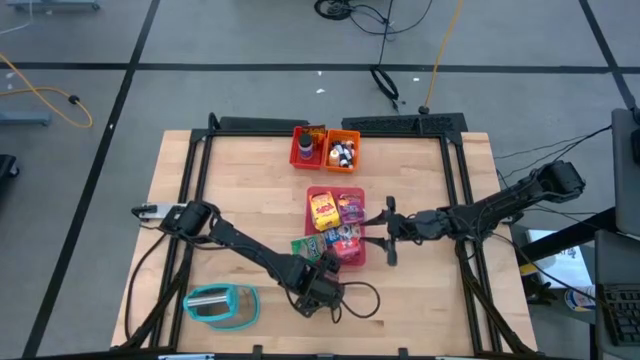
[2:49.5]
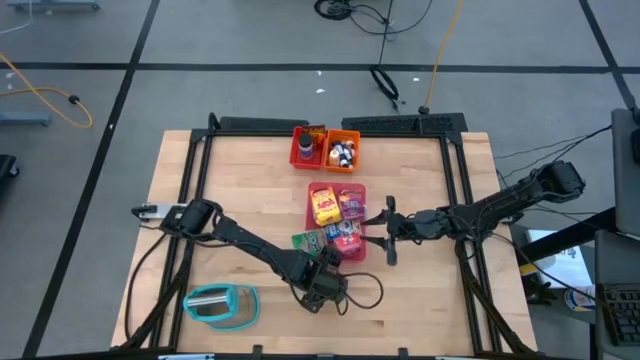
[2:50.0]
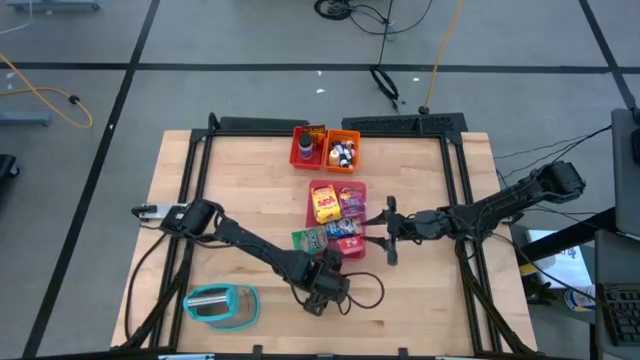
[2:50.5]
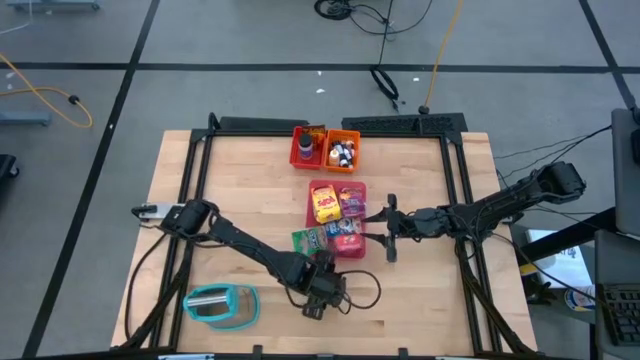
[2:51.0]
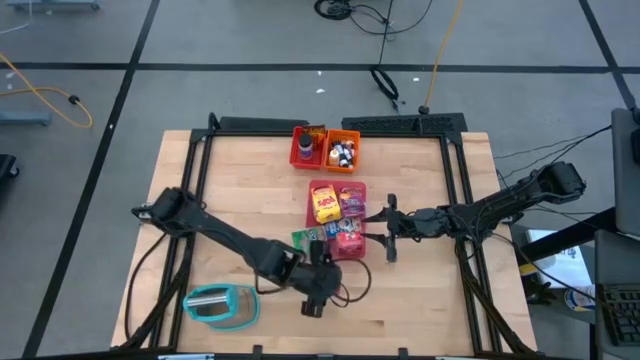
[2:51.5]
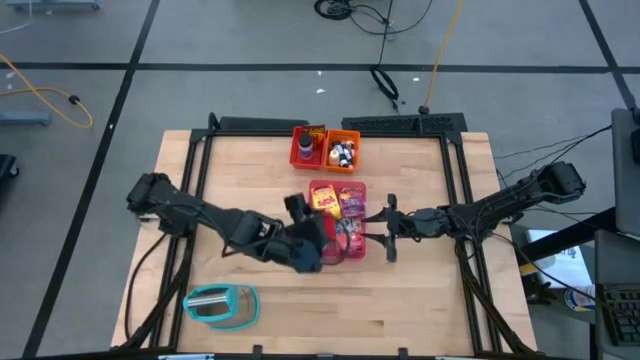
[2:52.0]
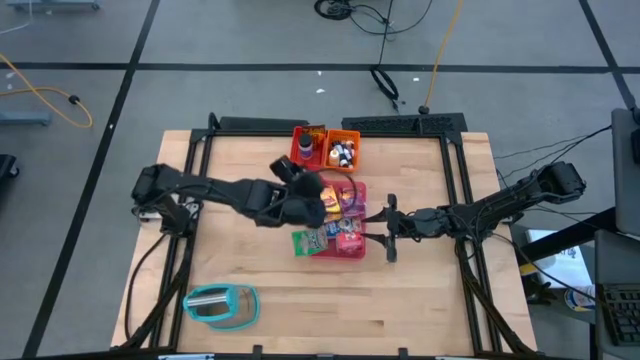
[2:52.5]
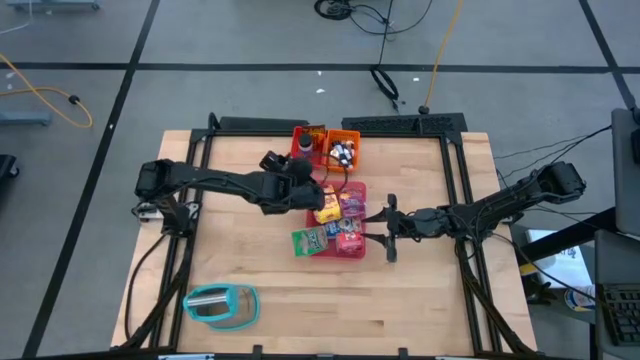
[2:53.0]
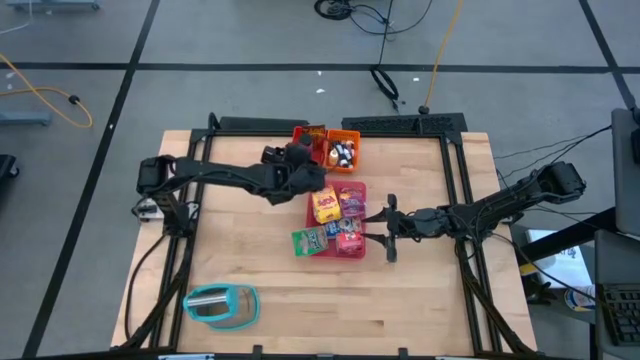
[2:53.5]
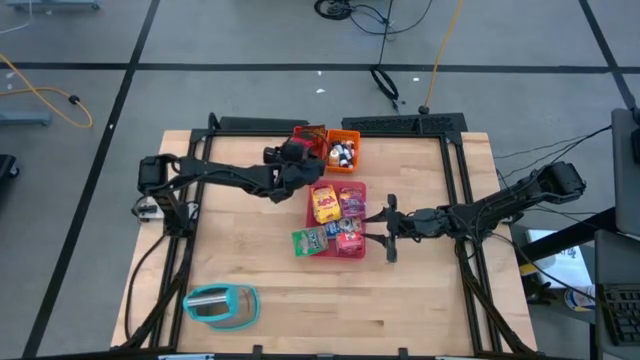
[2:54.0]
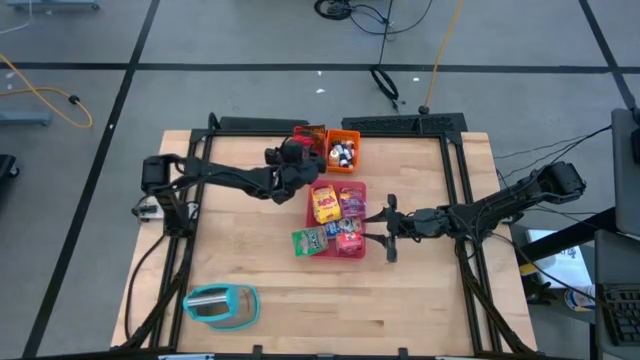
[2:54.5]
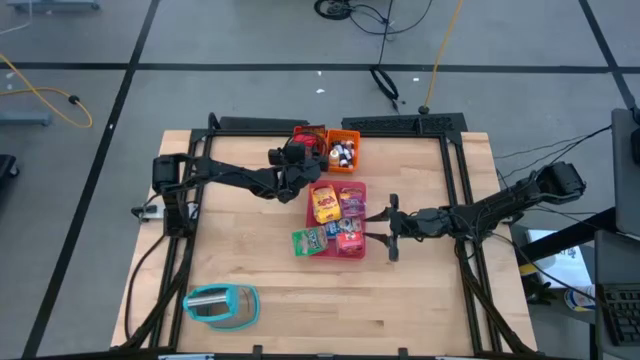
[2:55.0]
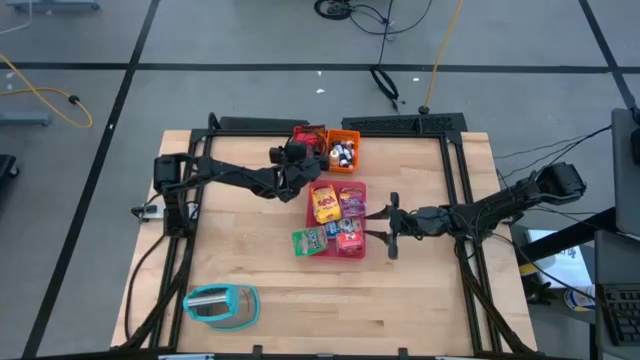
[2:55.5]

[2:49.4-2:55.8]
Task: Pick & Place Kitchen Items
Put the red seasoning can into the red basket

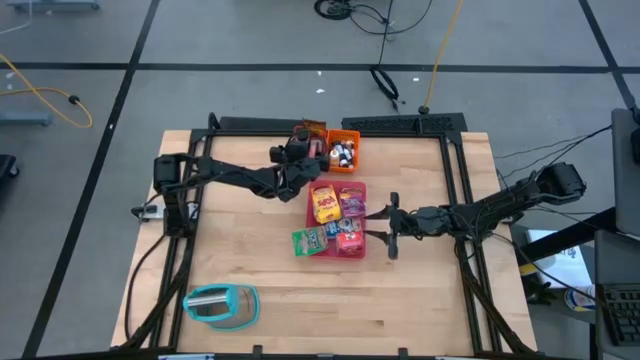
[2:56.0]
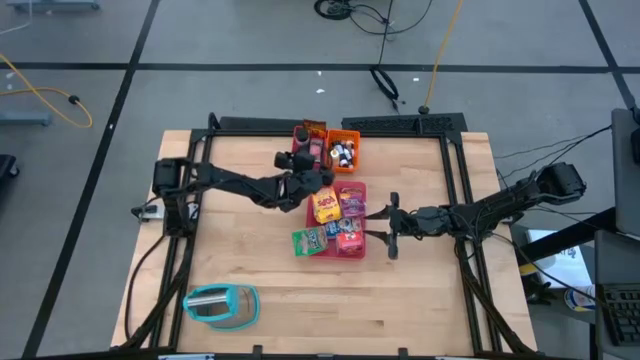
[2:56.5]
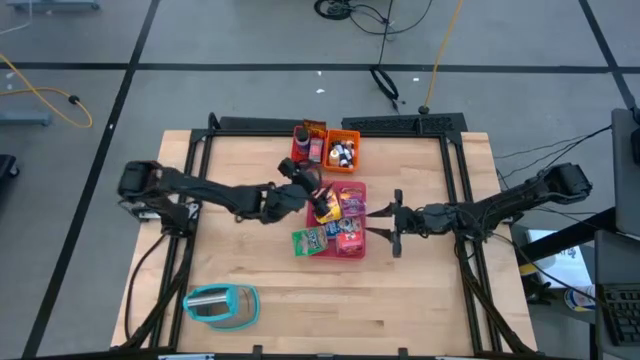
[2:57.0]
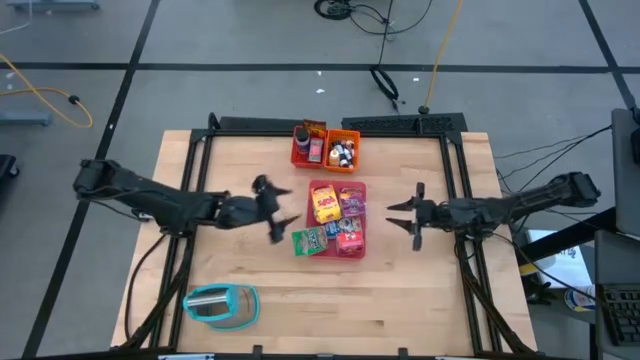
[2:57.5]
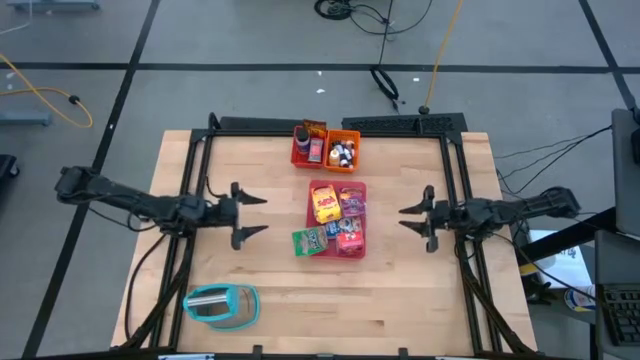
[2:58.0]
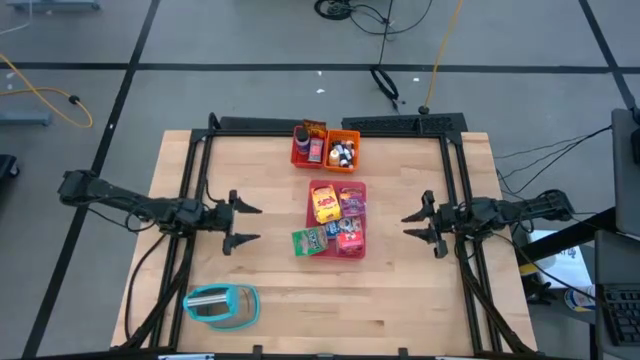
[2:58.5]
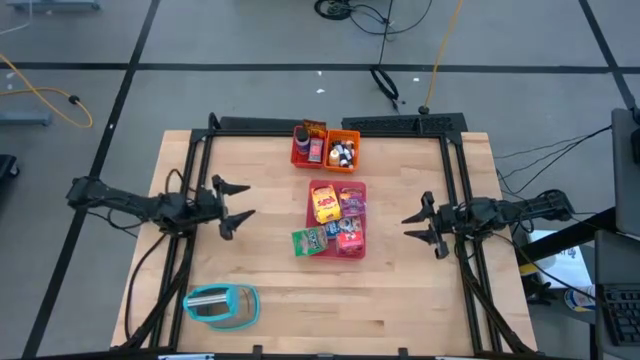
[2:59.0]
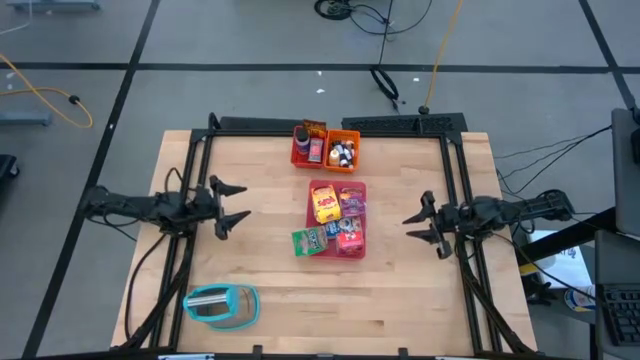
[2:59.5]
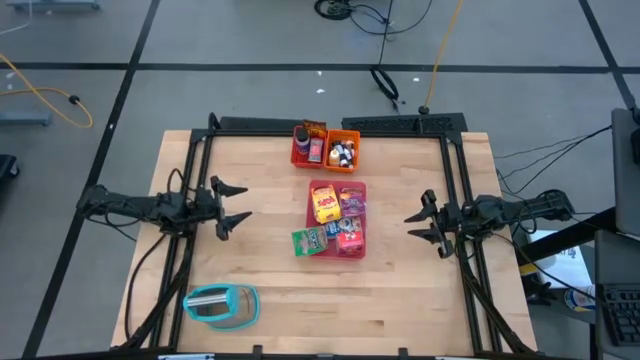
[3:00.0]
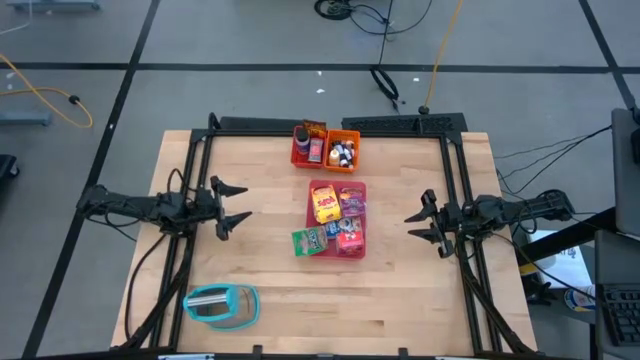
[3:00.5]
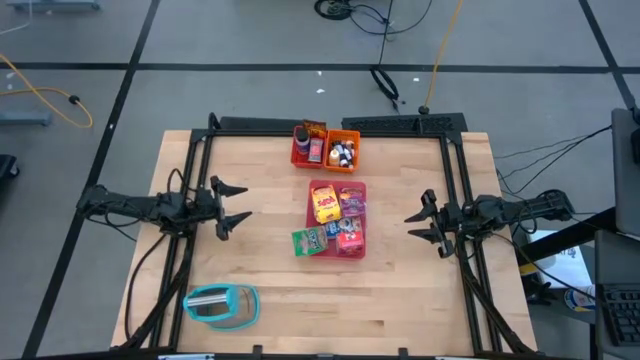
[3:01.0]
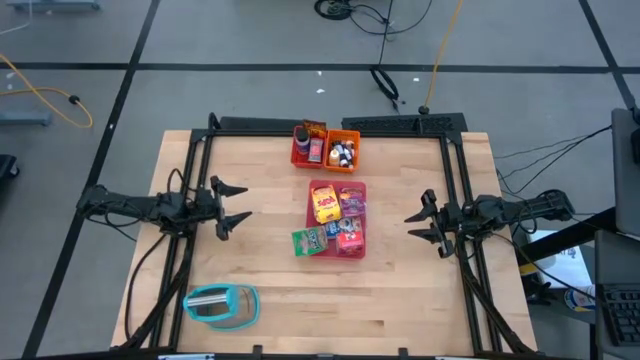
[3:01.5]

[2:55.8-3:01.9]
Return to Home Position

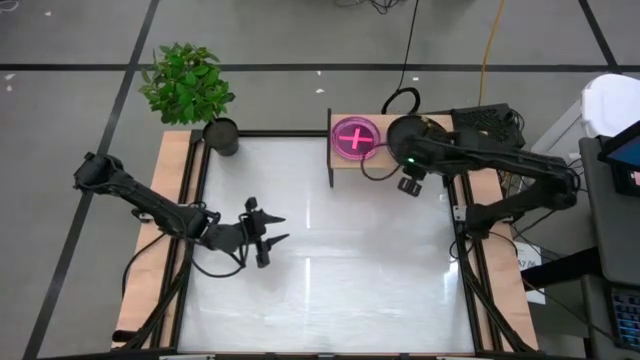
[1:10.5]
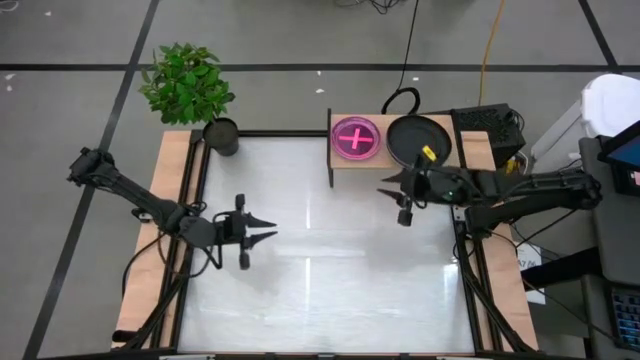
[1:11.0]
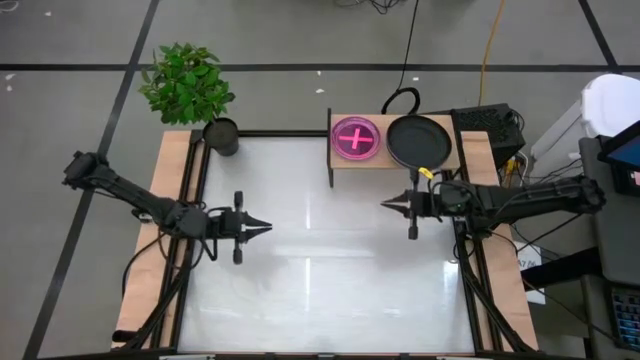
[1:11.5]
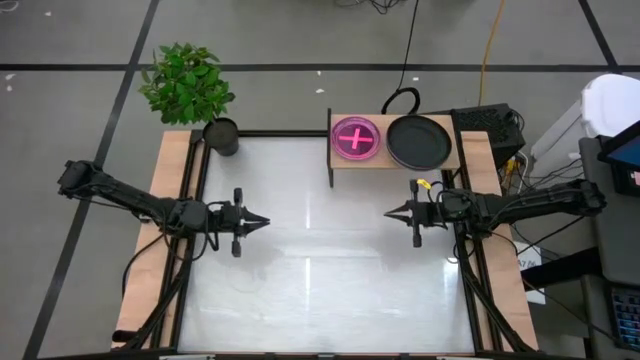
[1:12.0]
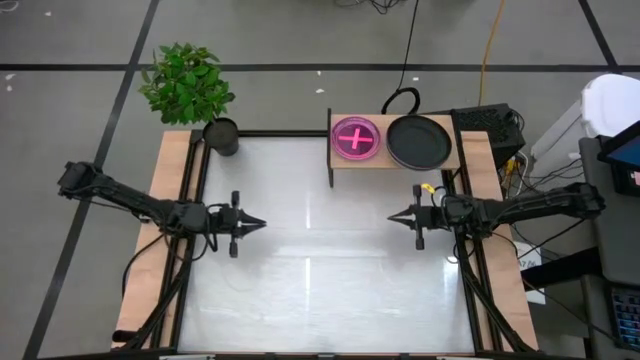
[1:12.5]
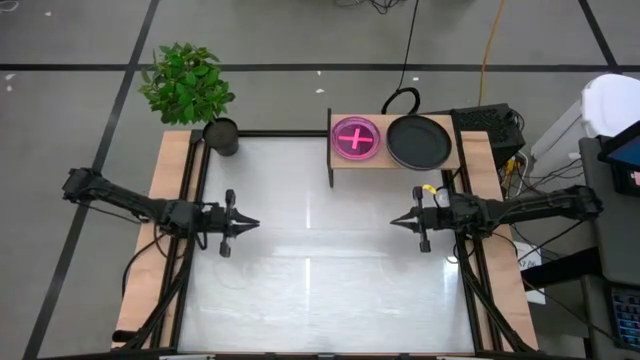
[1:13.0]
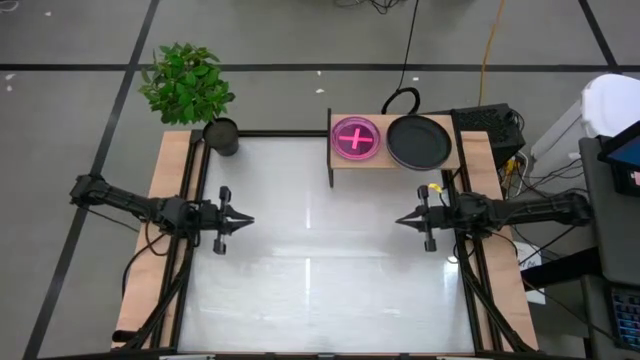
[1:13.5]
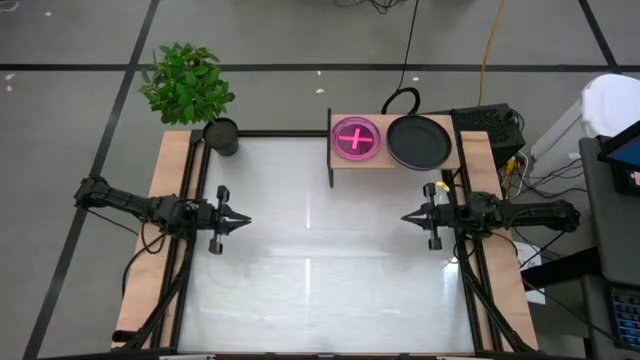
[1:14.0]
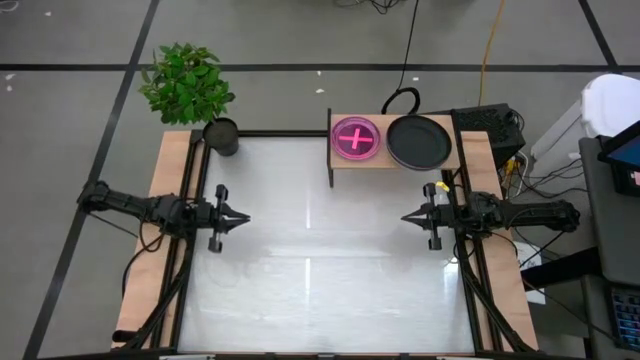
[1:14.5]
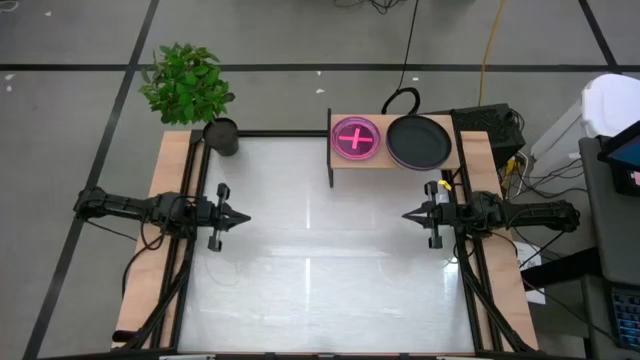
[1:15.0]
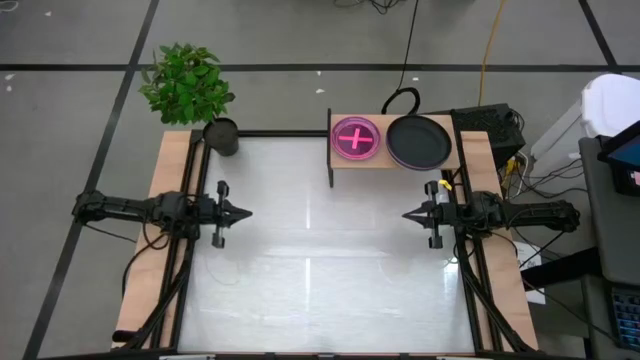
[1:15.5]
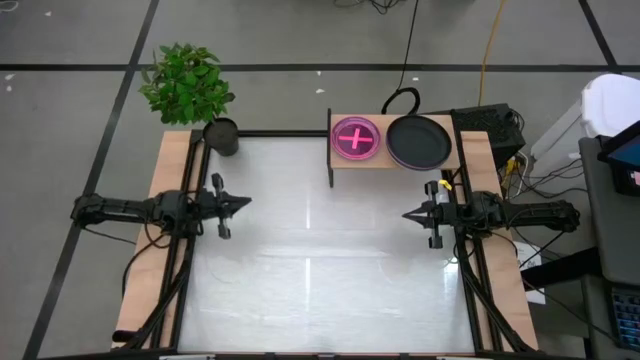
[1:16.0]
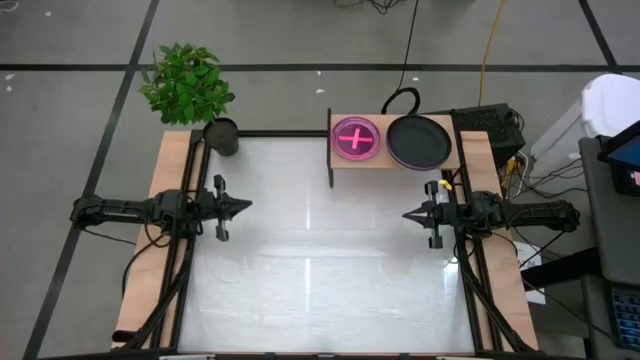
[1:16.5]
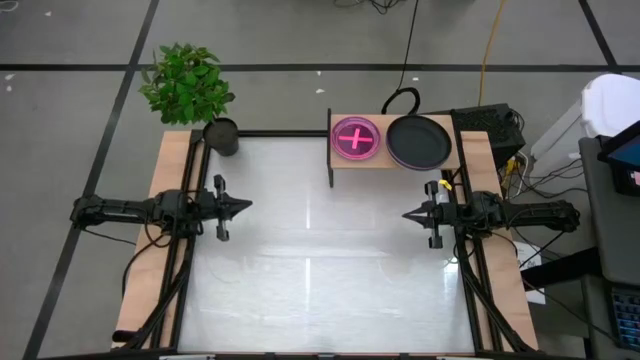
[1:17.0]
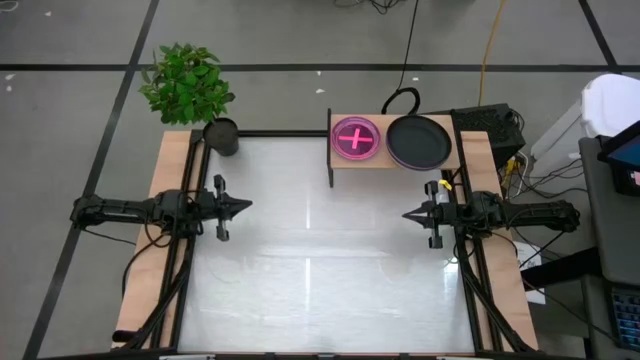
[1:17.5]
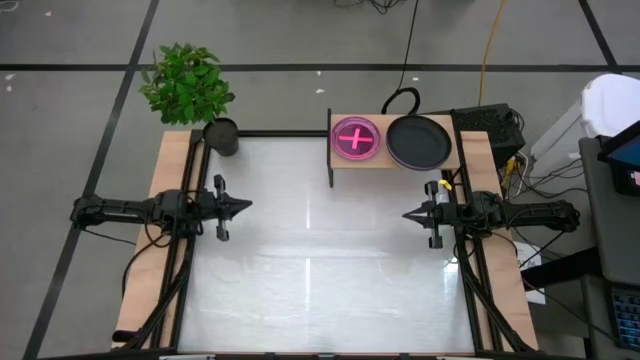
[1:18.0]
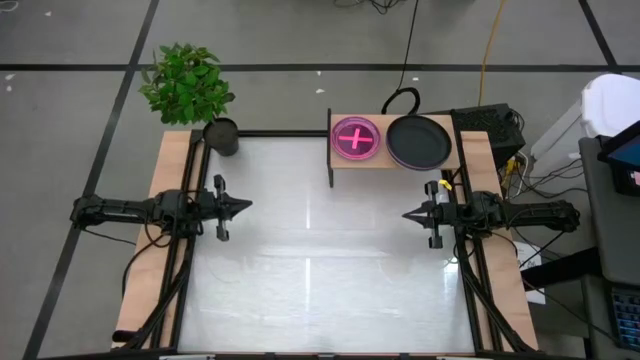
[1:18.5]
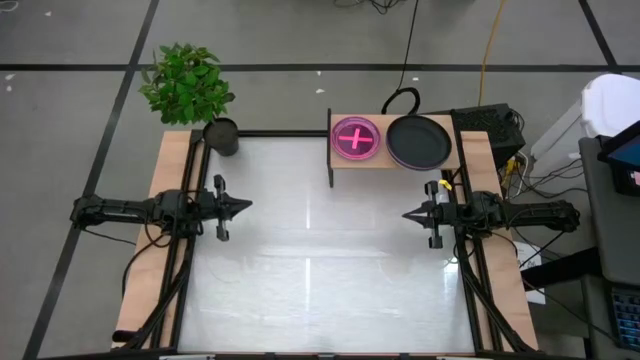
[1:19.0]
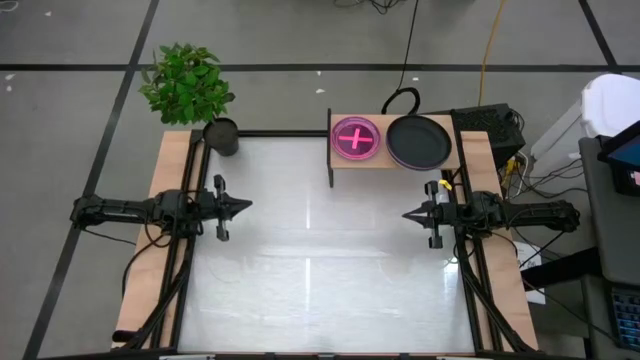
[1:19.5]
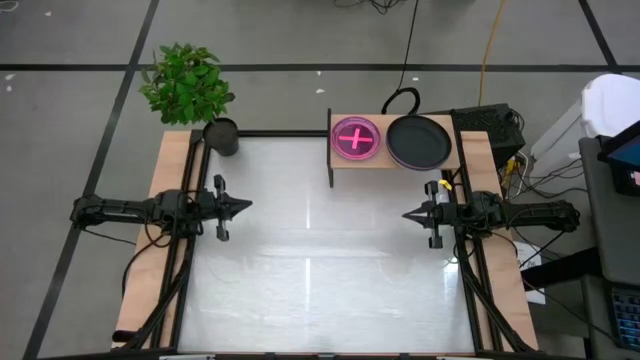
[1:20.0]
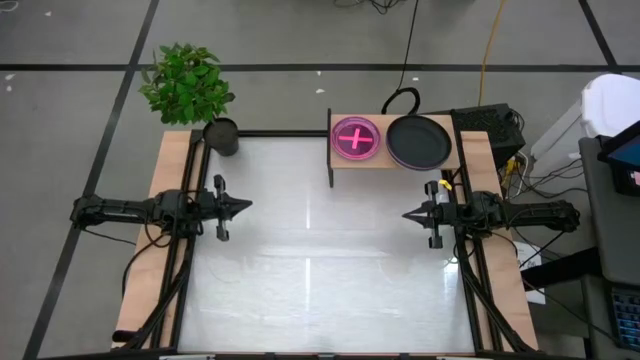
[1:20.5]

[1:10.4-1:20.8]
Task: Place and stack plates onto a shelf
Return to Home Position
